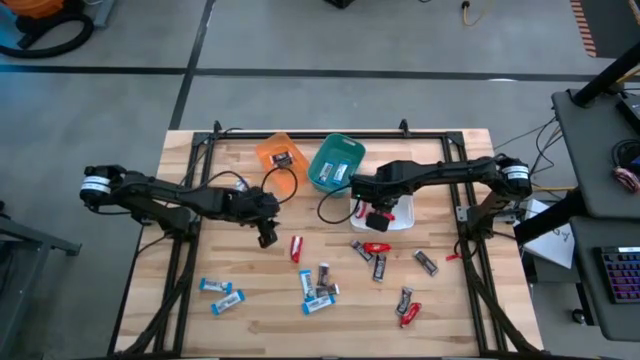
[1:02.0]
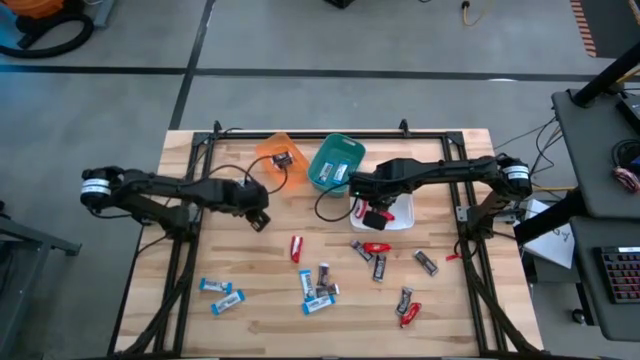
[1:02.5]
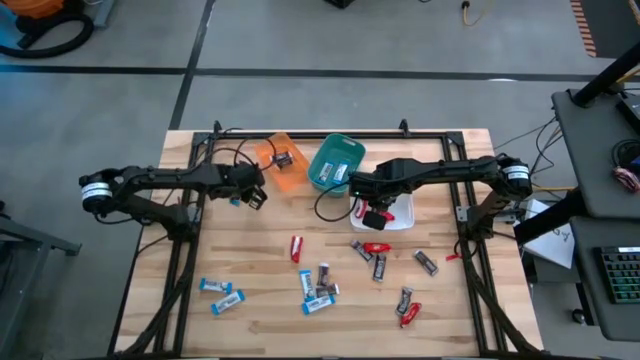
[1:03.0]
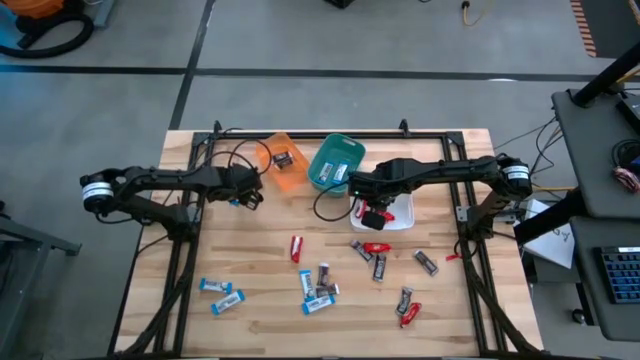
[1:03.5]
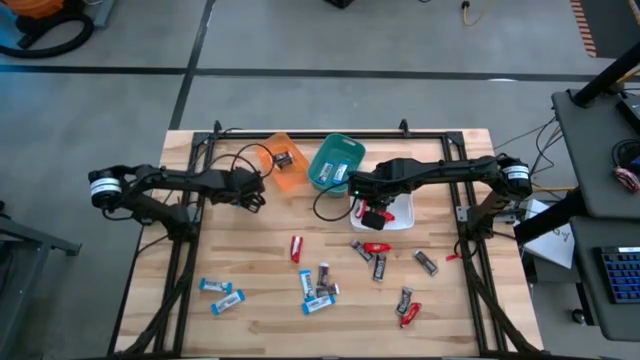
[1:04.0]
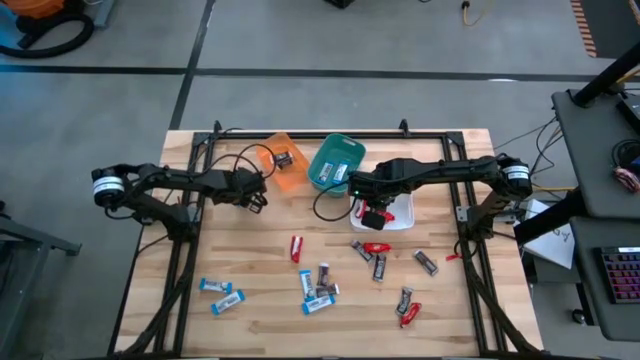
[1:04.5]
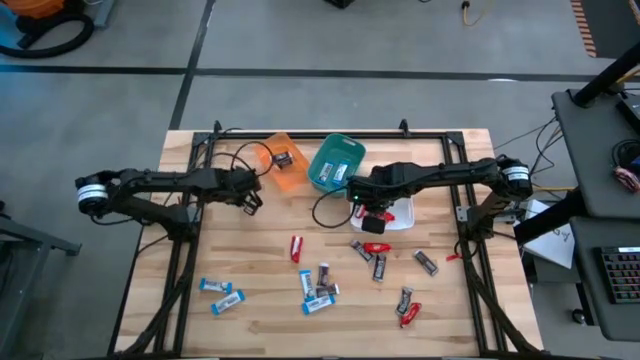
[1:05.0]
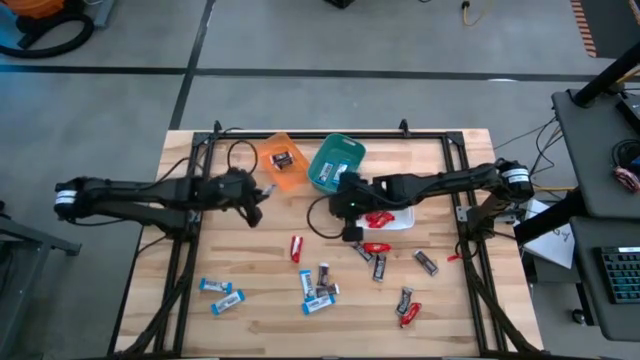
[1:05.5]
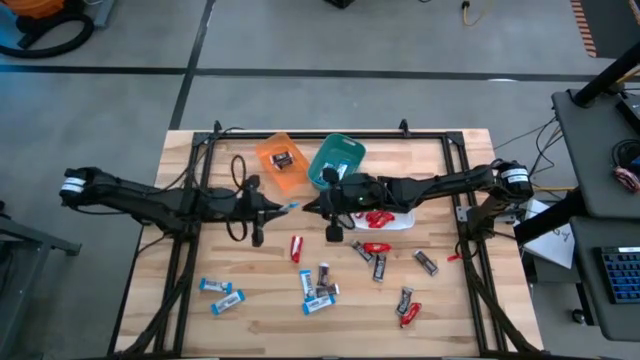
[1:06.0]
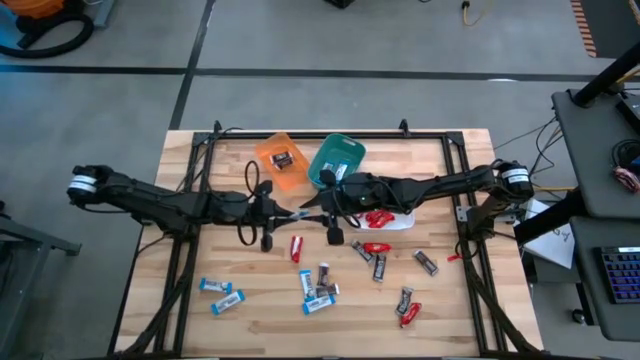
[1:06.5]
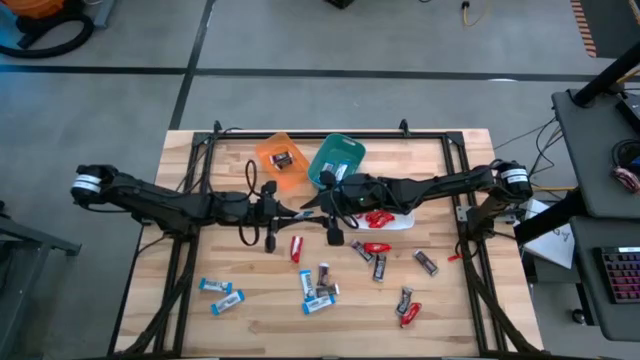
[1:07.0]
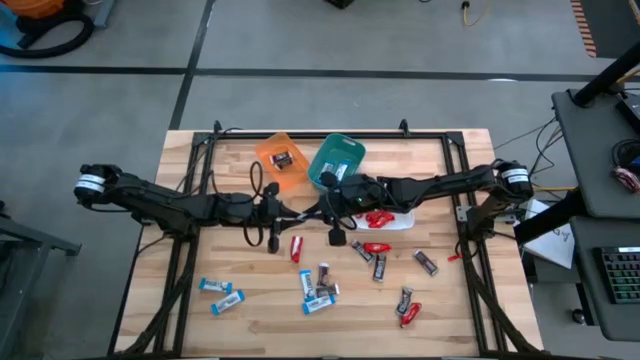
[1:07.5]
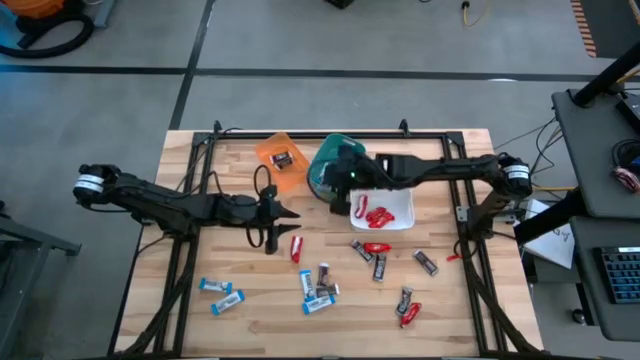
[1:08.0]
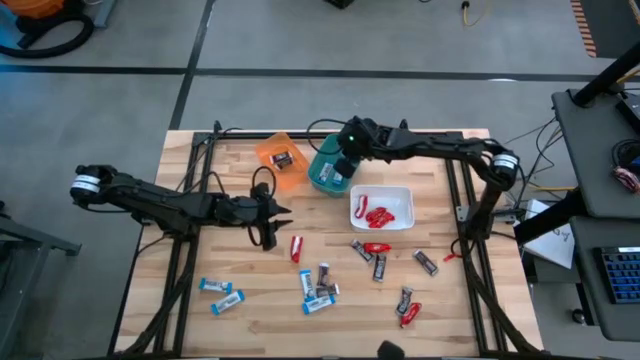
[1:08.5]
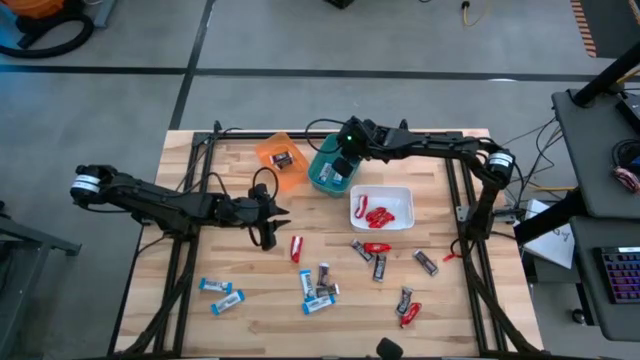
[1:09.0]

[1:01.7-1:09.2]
Task: Sort candy
Put the white chocolate bar into the green bin

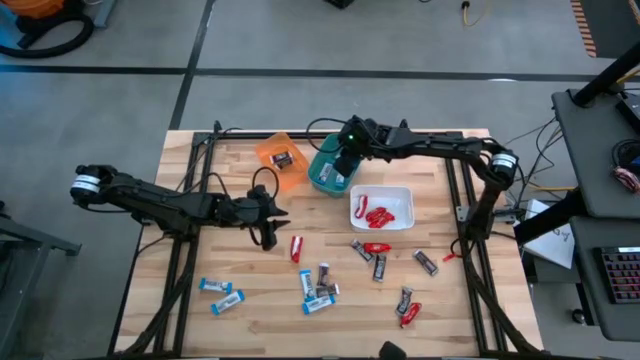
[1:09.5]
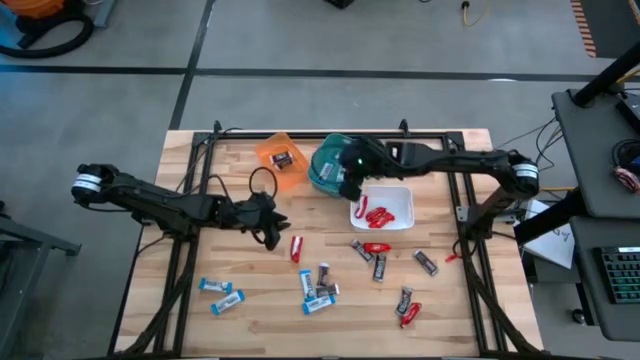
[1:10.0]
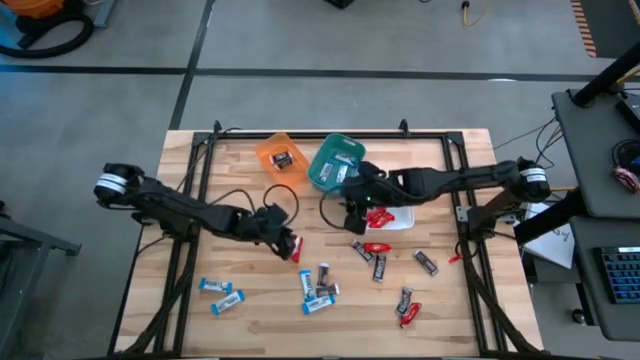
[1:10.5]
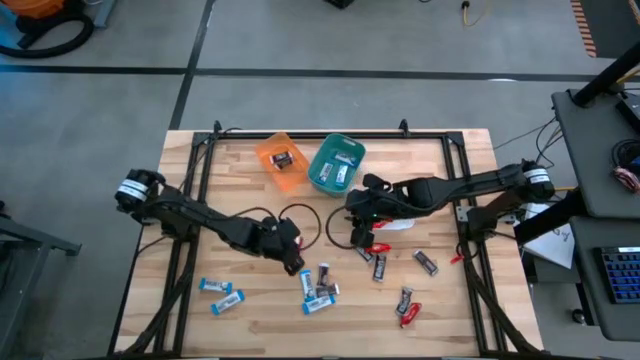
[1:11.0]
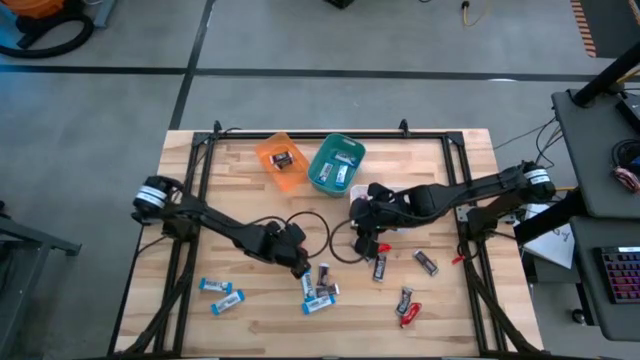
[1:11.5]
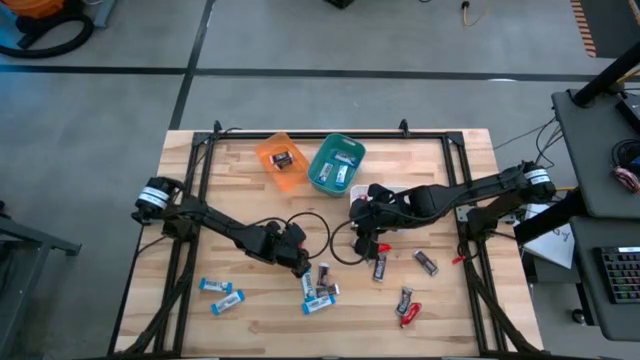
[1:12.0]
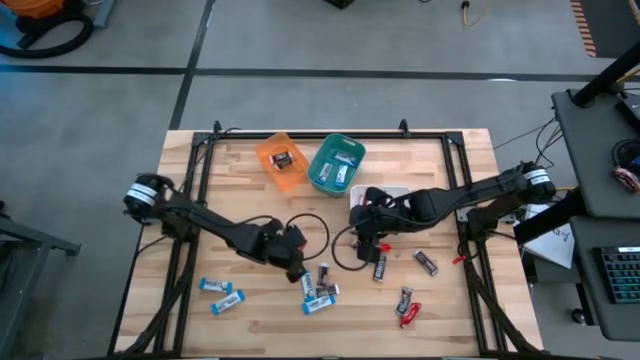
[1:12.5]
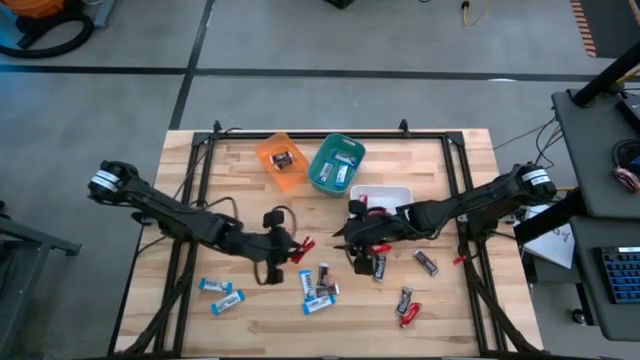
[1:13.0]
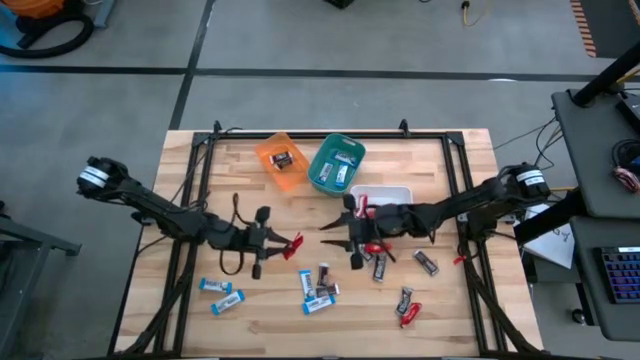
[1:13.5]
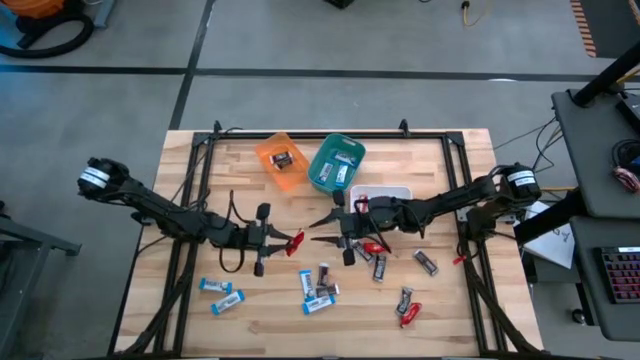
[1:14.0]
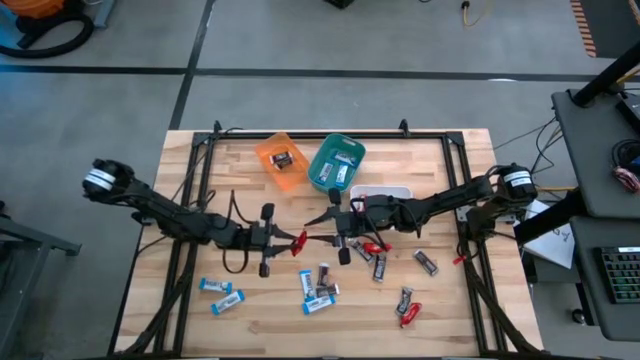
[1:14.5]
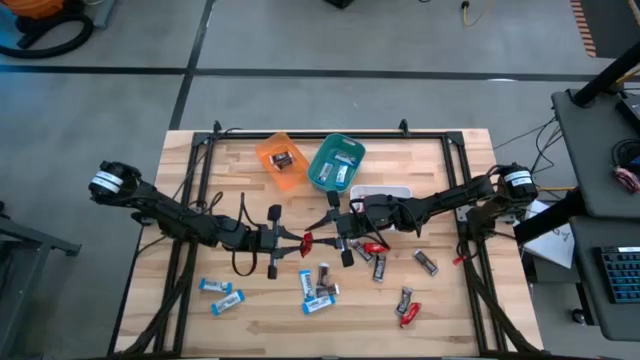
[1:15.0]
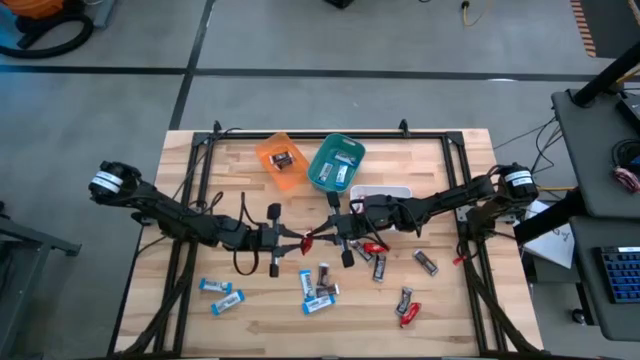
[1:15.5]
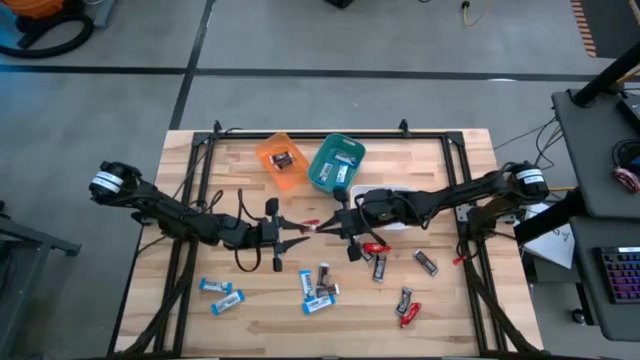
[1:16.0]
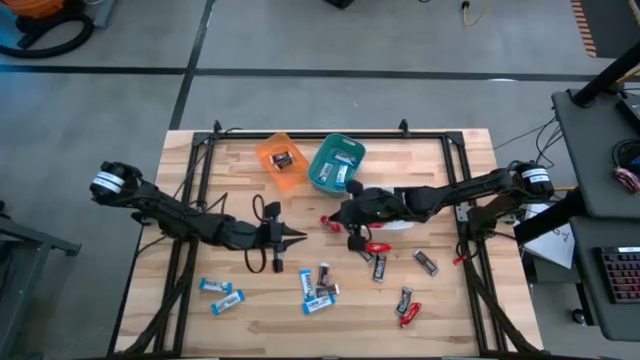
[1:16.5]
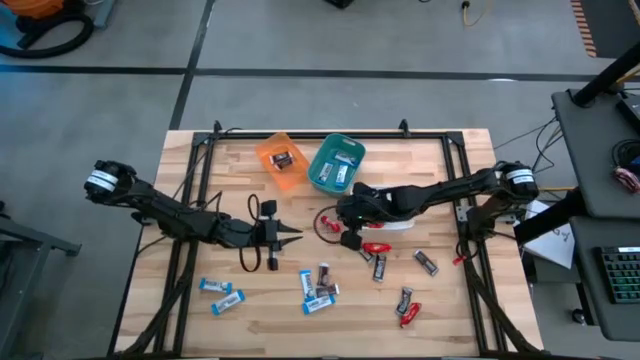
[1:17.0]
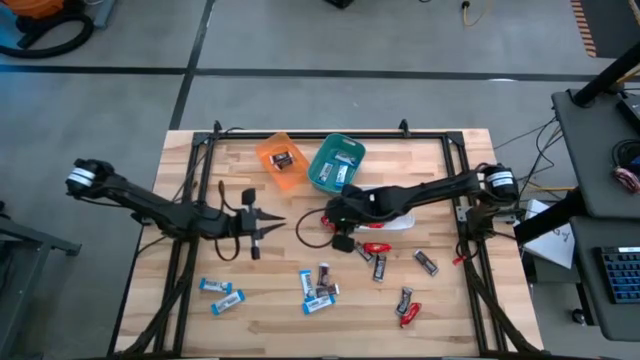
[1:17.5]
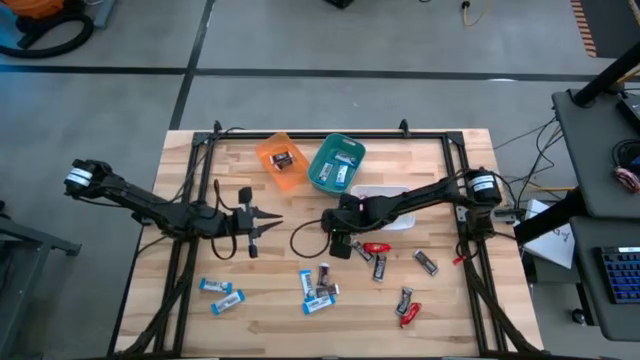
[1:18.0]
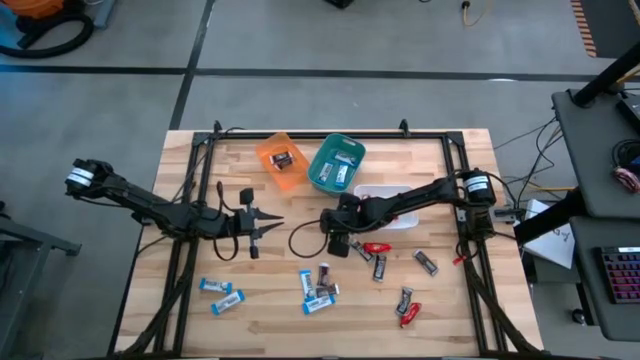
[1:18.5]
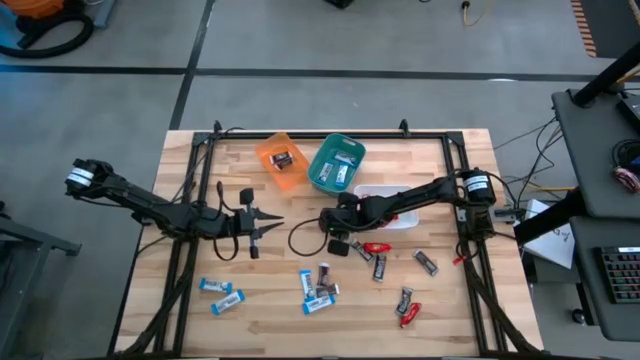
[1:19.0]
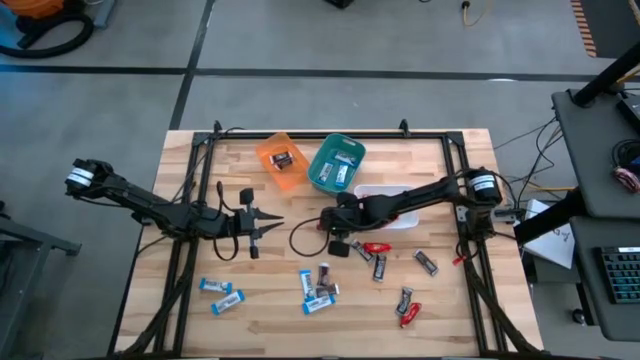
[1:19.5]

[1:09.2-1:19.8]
Put the top left red chocolate bar into the white bin

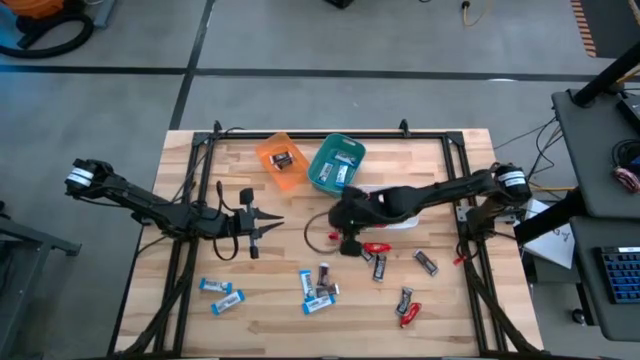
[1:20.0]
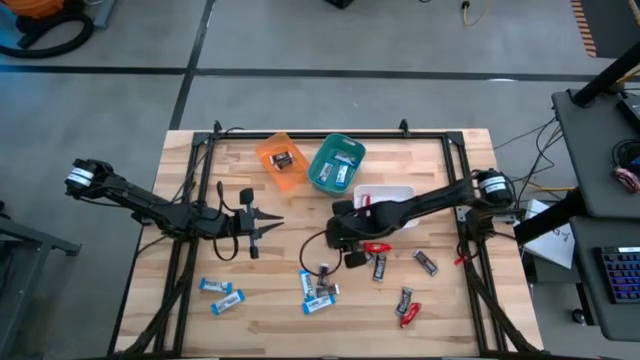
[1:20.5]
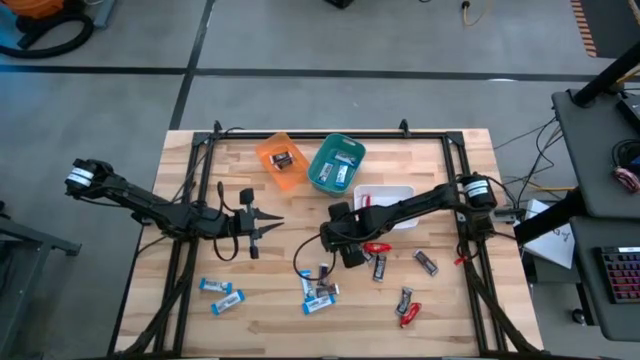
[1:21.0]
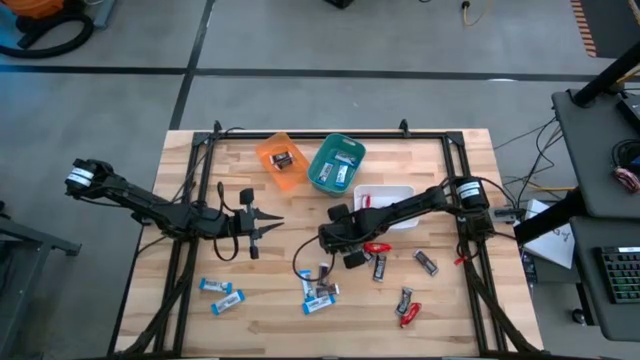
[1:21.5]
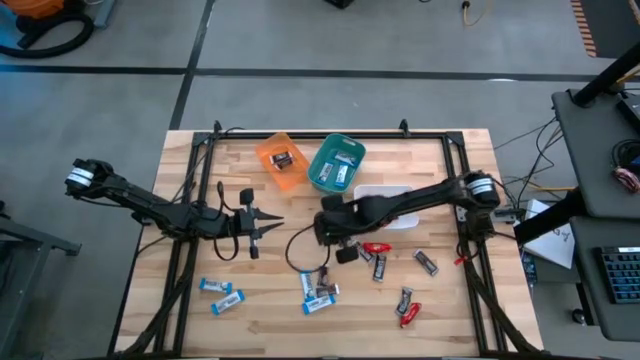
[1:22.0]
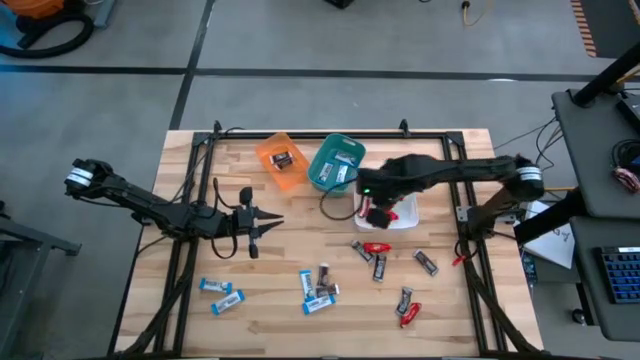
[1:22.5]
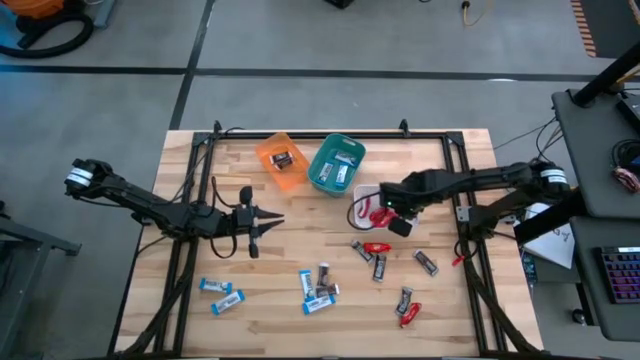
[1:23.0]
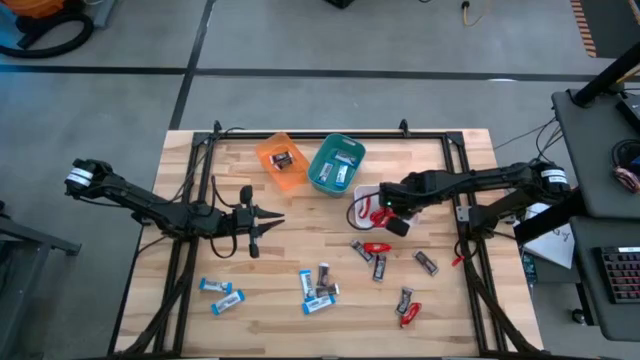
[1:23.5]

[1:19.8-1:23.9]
Put the top left red chocolate bar into the white bin
